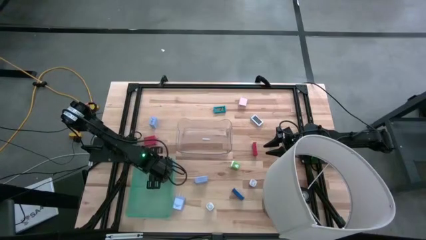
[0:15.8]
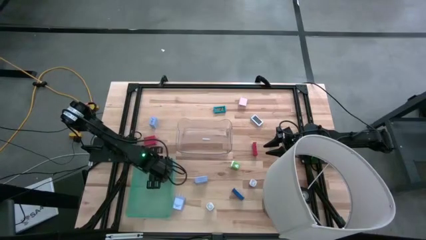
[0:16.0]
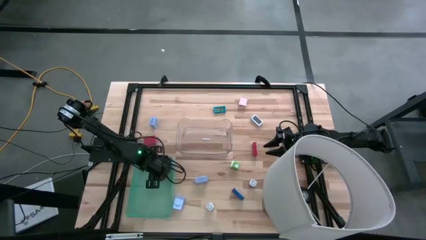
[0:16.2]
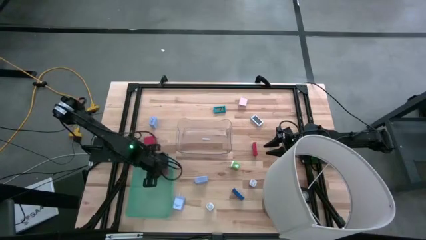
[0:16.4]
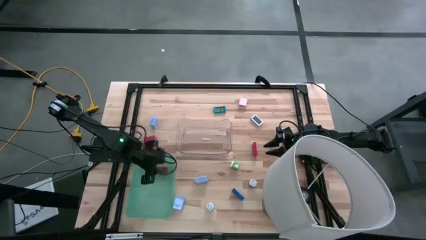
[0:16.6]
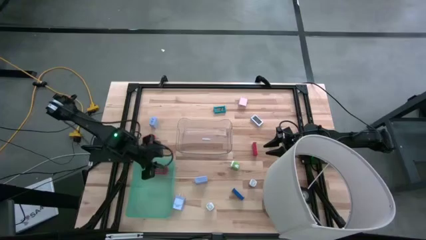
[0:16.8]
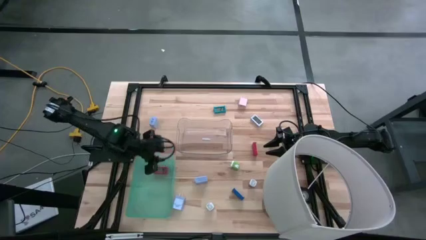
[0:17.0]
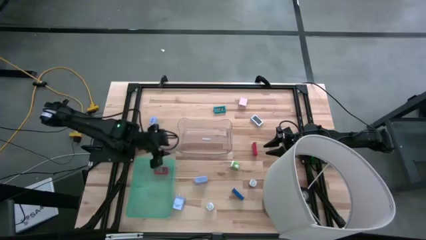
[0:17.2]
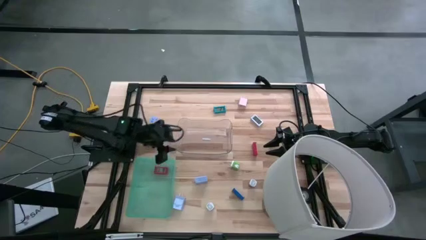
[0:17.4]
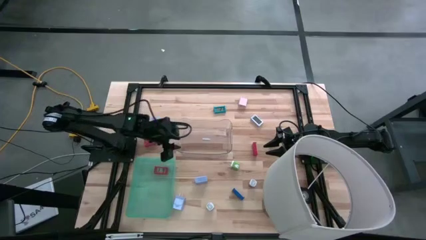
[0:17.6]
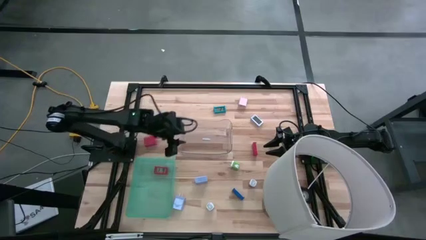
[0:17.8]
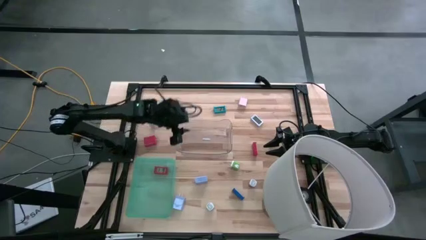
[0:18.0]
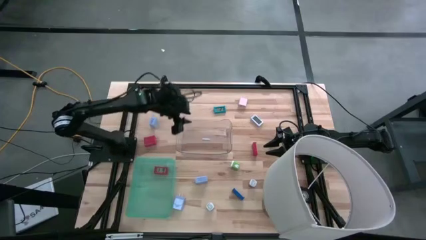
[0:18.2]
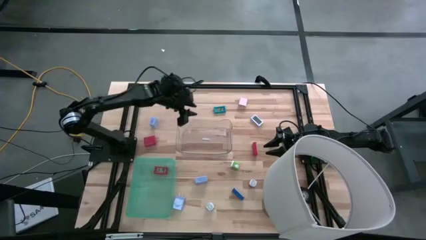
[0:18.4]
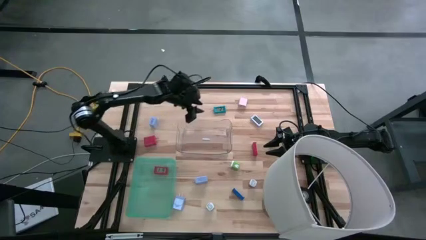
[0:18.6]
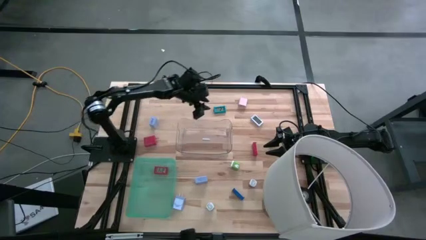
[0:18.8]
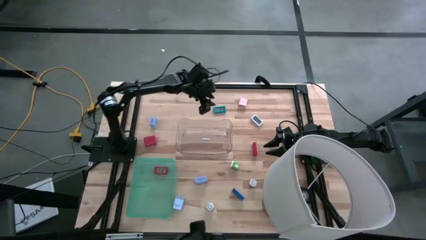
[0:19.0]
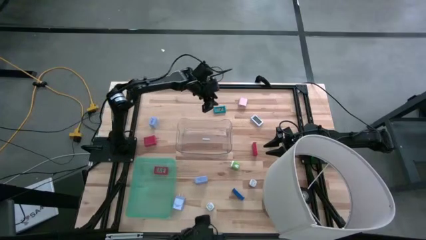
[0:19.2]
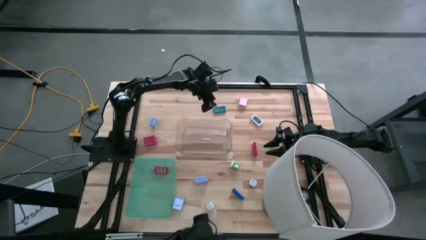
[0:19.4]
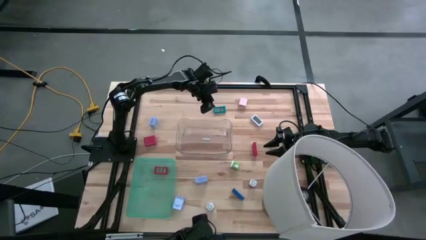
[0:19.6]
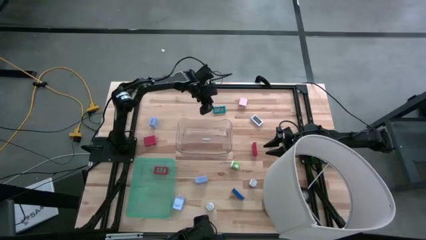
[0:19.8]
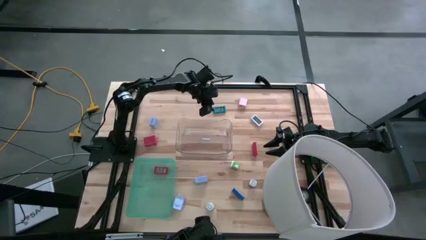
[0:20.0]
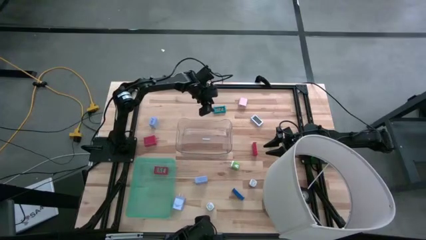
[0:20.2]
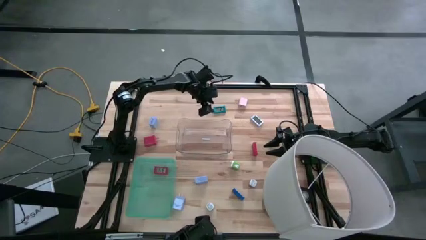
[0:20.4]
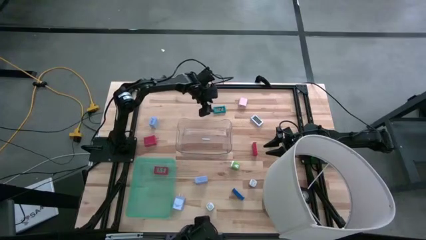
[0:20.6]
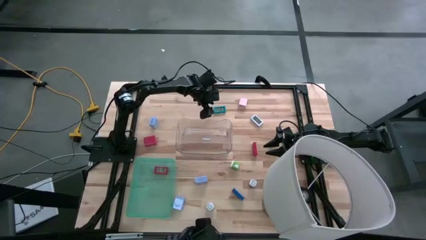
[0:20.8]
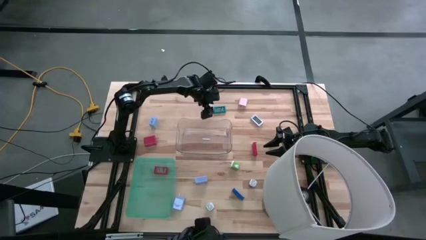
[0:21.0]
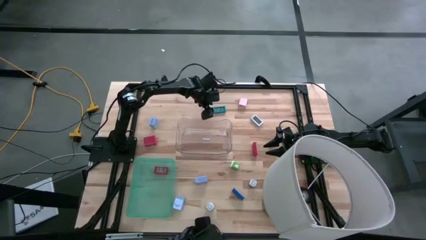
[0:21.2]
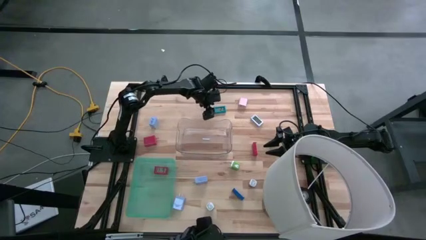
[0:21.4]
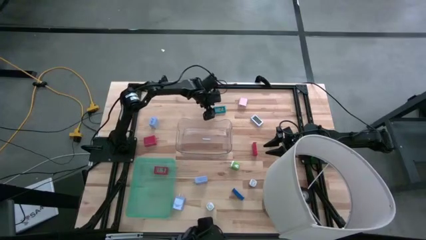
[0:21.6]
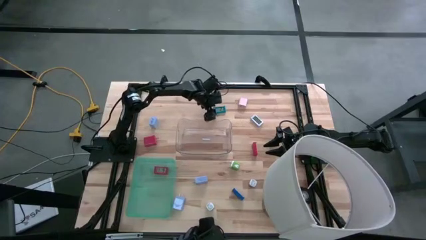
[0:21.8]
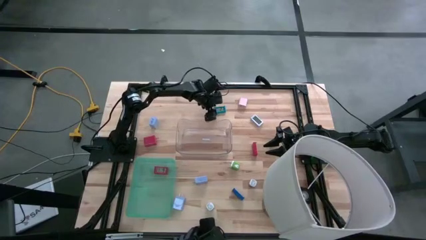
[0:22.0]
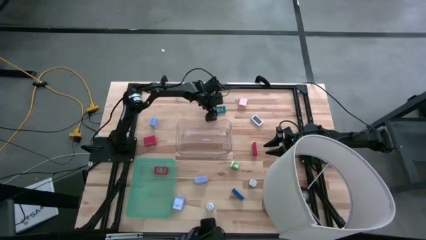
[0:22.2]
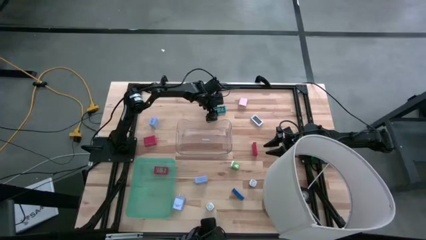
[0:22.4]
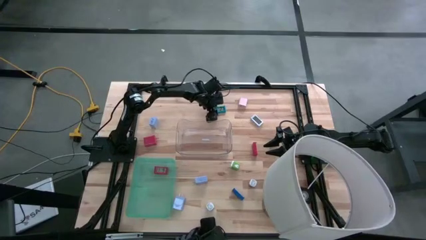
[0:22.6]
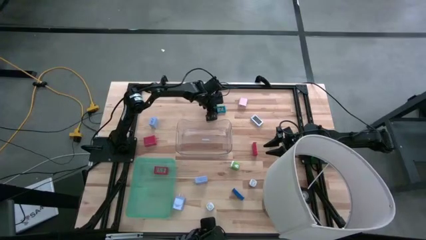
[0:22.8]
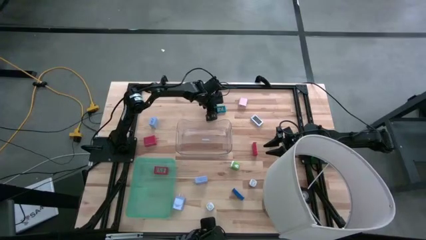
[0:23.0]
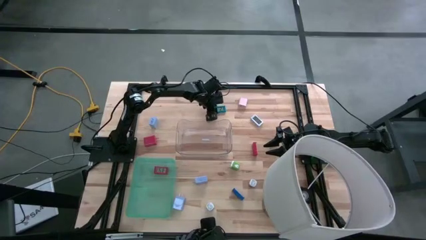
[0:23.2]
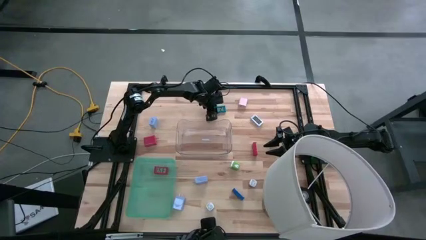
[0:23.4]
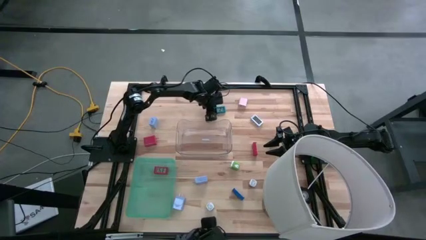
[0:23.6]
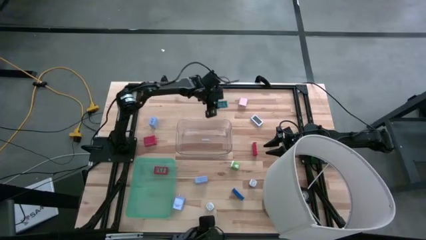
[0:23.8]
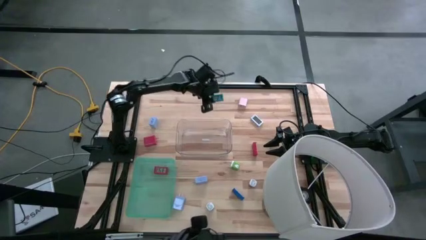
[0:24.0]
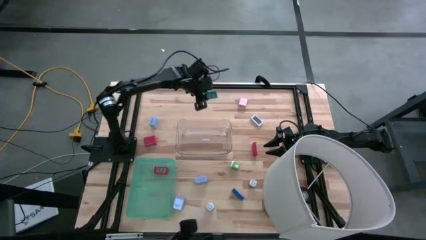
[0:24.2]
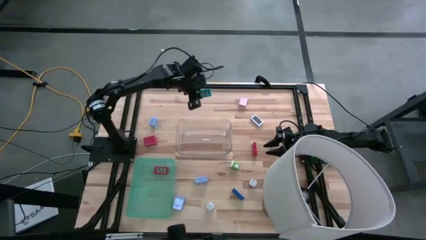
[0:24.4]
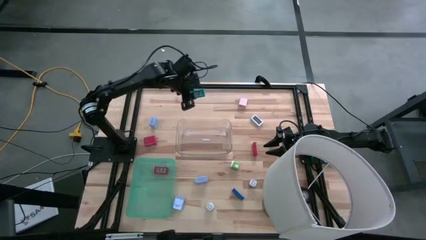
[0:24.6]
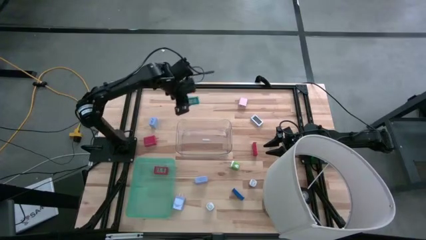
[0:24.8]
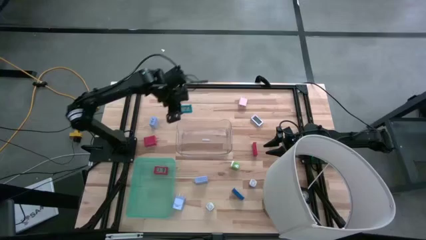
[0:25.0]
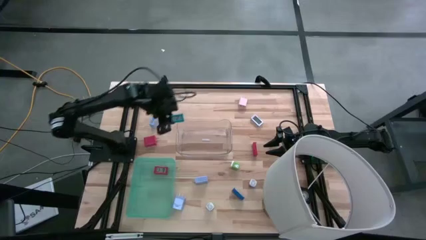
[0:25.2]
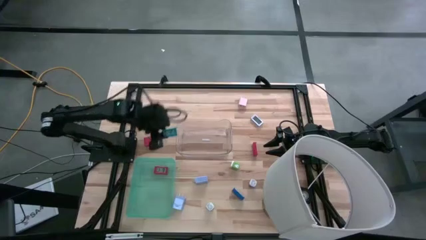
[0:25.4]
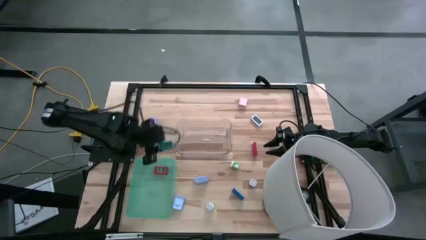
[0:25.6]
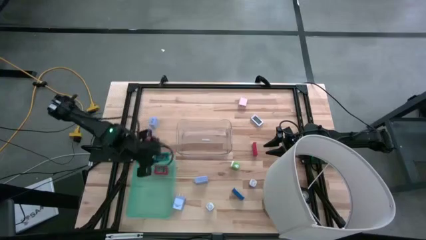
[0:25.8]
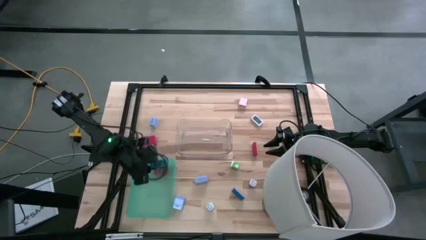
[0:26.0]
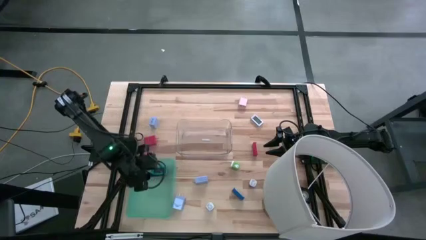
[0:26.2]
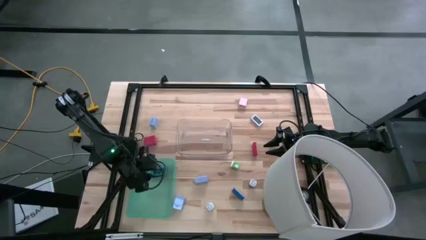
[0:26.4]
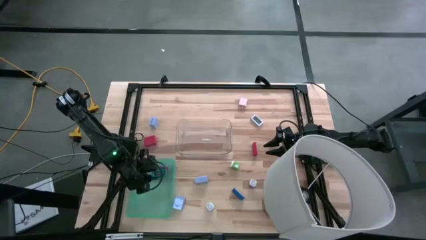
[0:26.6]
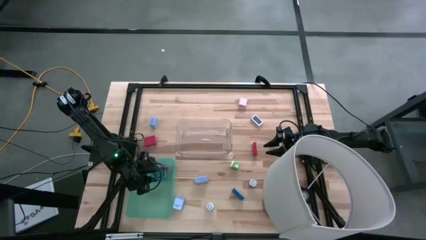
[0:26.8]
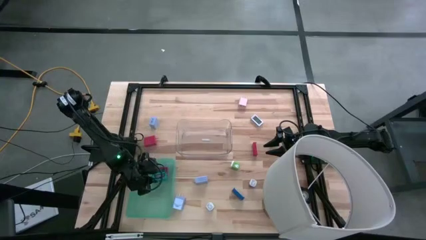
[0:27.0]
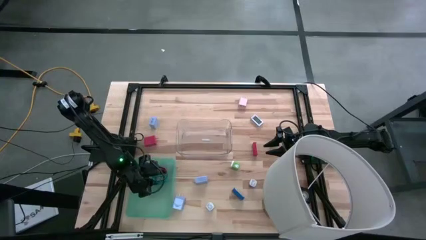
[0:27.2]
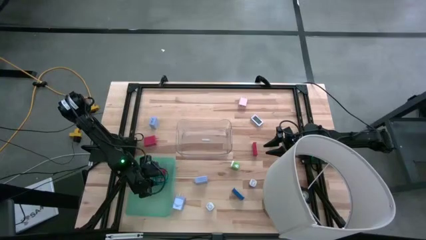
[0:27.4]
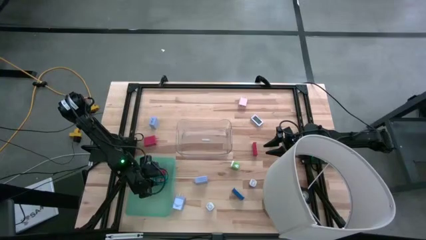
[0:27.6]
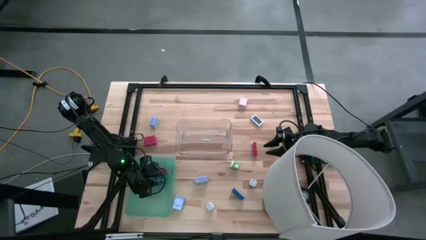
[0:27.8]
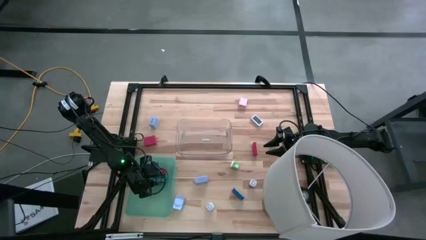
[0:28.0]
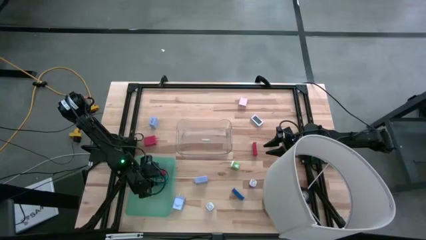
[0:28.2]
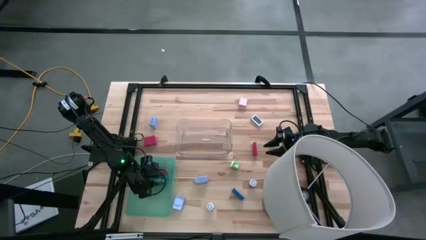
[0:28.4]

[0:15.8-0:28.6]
Task: Pick & Place Office items
Put the top light blue digital clock into the green bin
